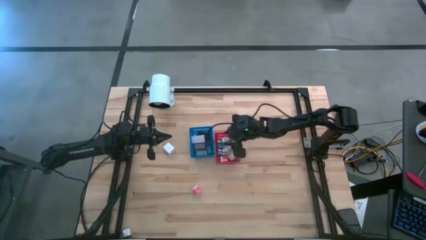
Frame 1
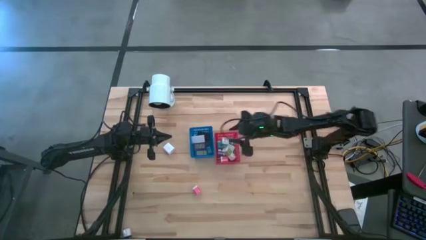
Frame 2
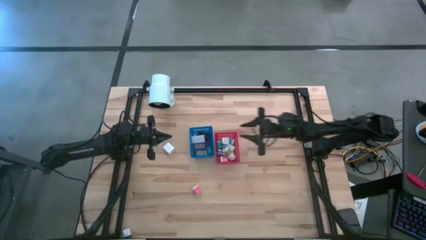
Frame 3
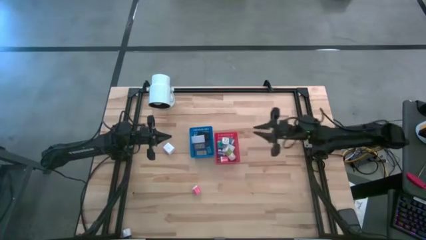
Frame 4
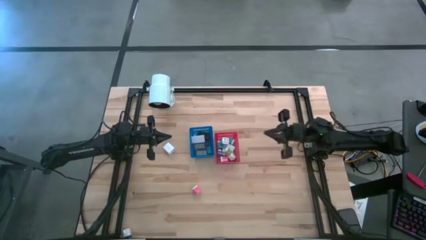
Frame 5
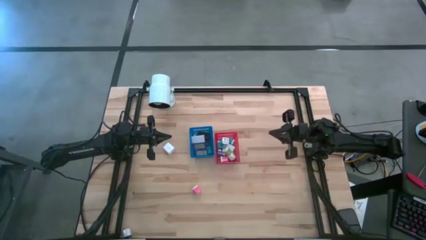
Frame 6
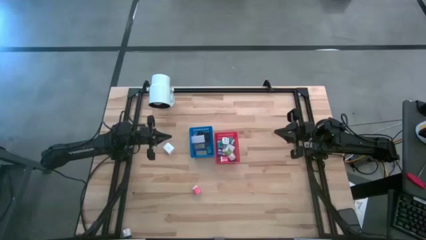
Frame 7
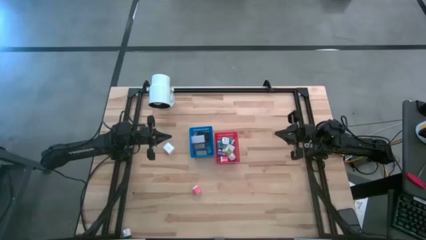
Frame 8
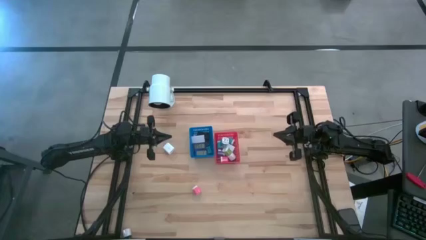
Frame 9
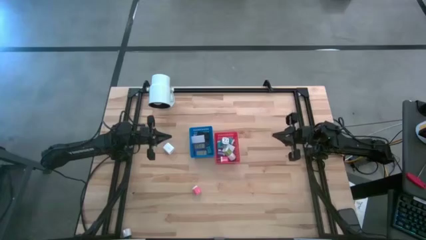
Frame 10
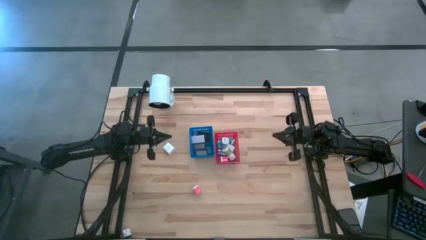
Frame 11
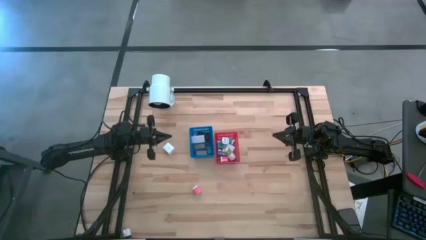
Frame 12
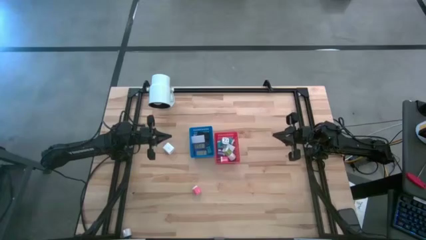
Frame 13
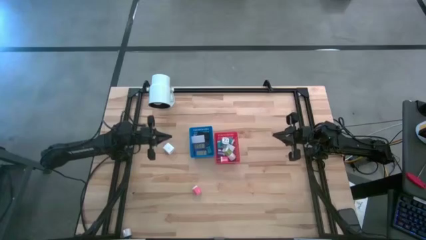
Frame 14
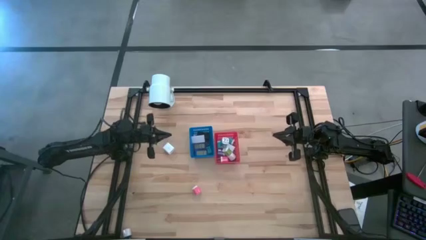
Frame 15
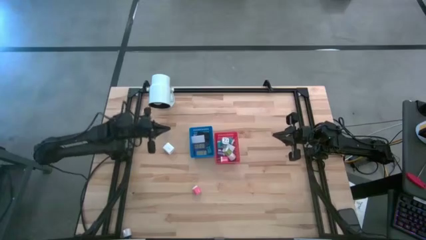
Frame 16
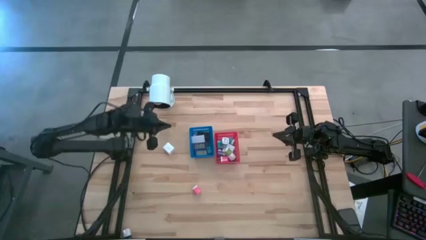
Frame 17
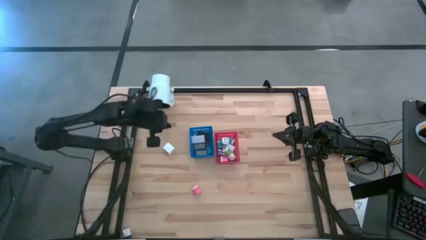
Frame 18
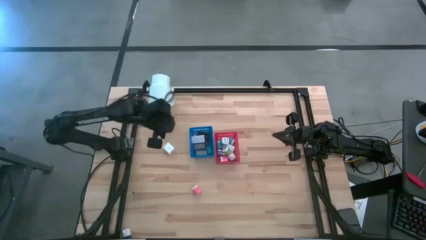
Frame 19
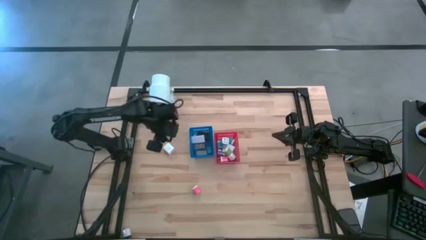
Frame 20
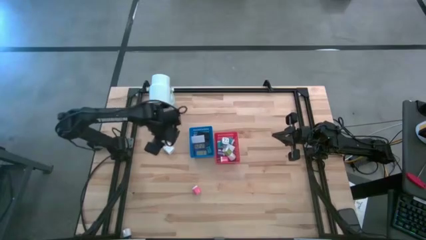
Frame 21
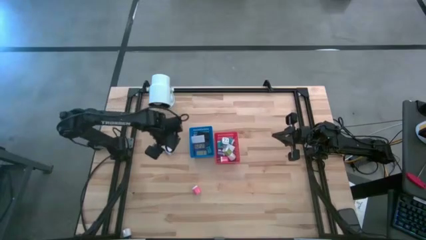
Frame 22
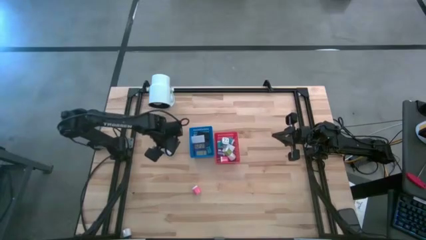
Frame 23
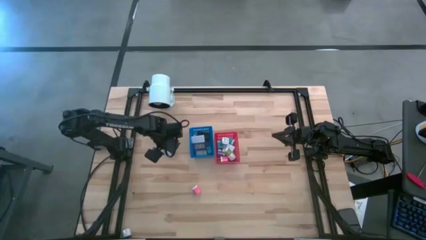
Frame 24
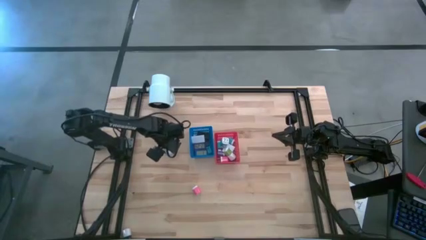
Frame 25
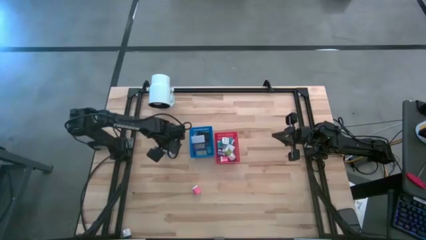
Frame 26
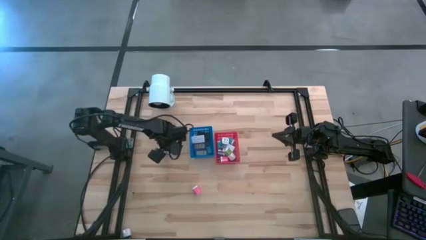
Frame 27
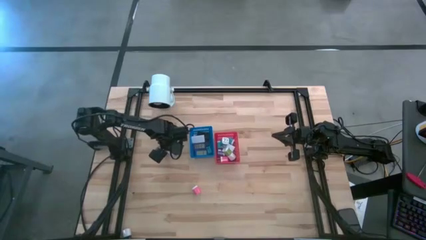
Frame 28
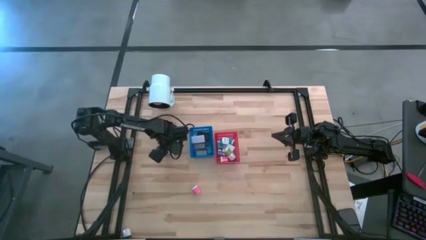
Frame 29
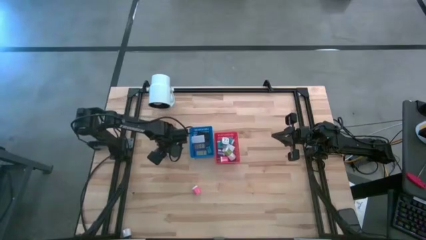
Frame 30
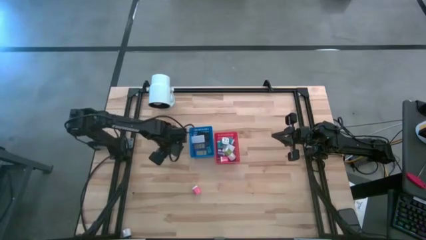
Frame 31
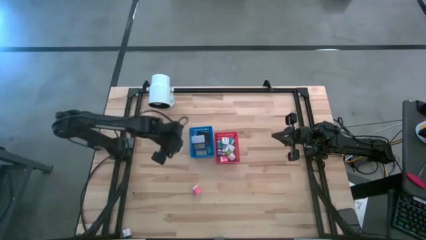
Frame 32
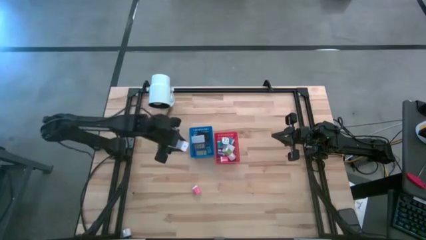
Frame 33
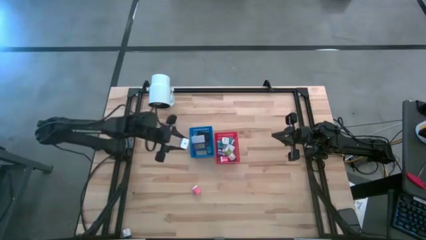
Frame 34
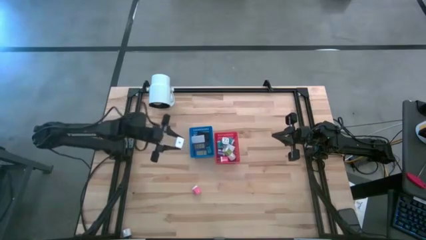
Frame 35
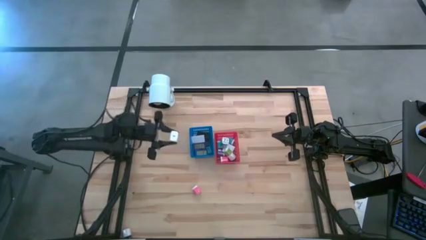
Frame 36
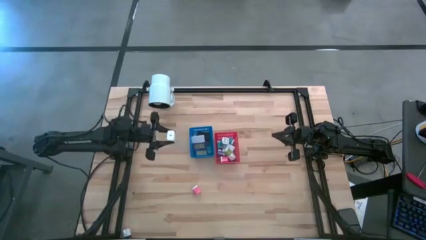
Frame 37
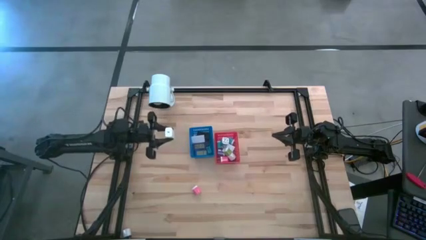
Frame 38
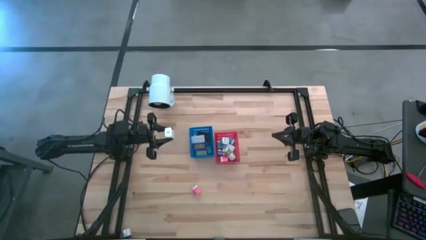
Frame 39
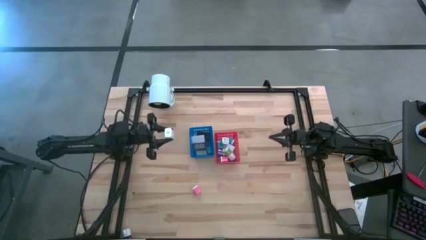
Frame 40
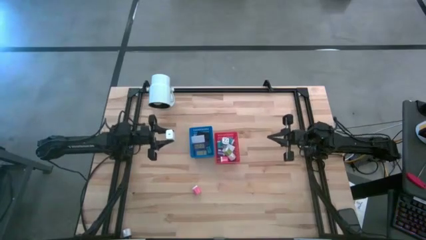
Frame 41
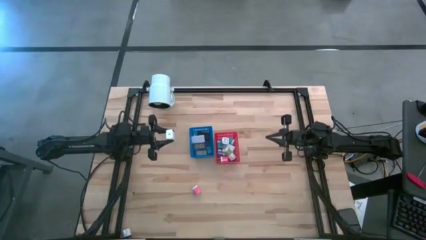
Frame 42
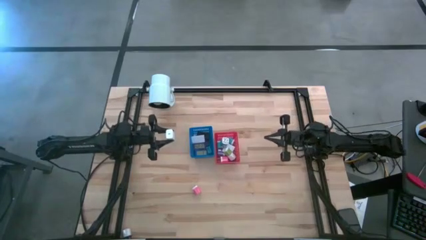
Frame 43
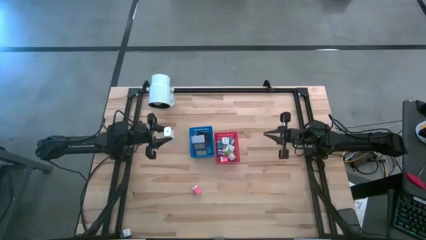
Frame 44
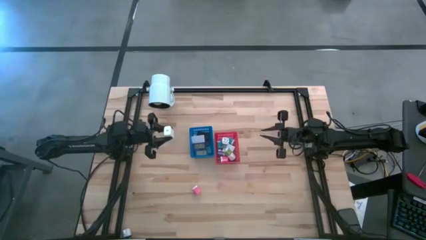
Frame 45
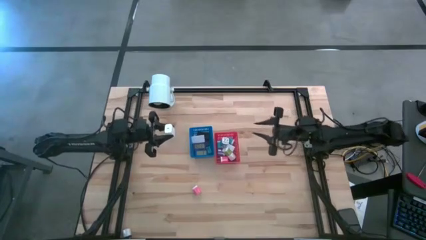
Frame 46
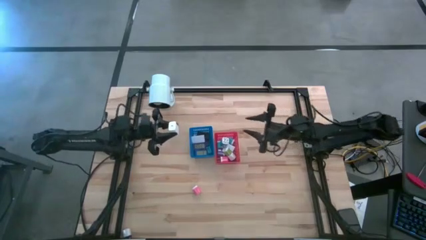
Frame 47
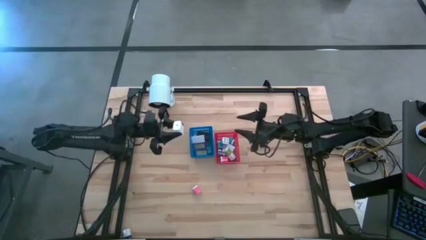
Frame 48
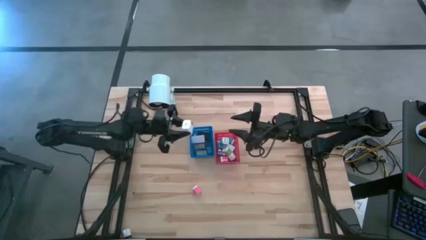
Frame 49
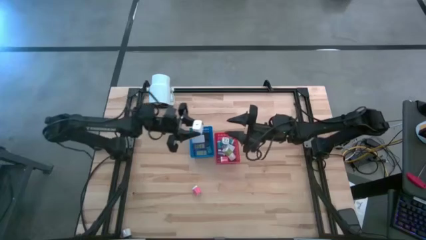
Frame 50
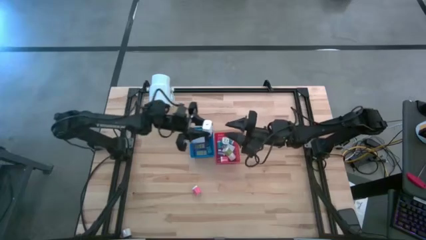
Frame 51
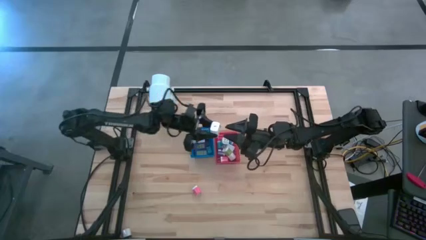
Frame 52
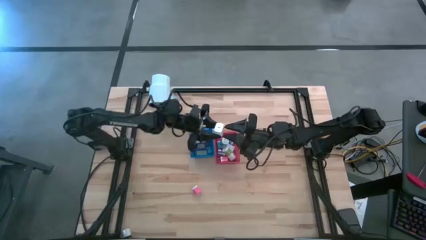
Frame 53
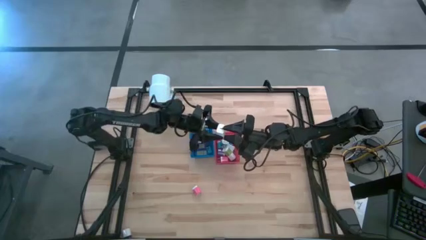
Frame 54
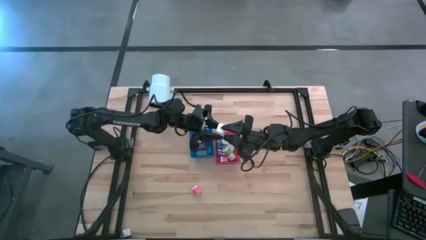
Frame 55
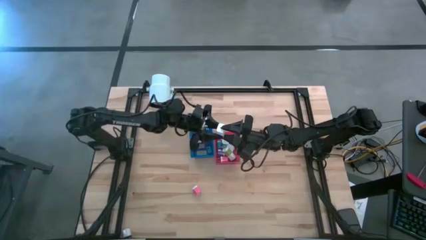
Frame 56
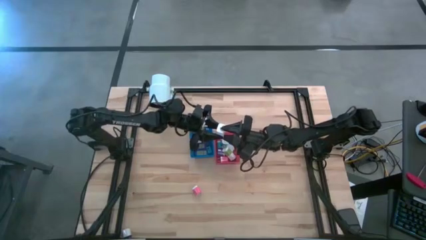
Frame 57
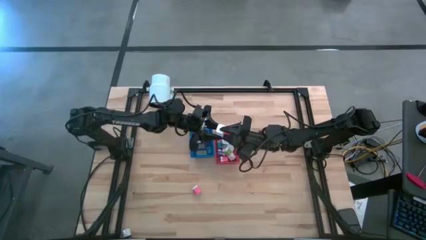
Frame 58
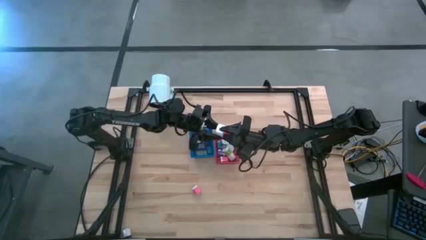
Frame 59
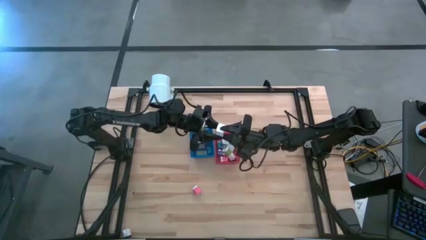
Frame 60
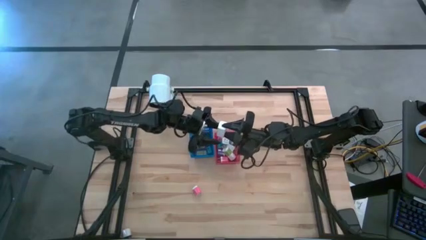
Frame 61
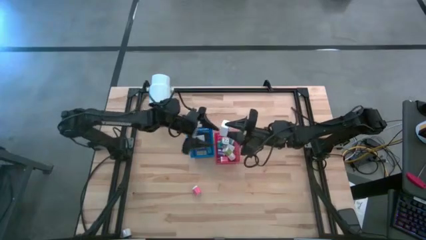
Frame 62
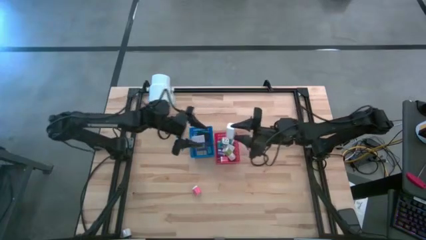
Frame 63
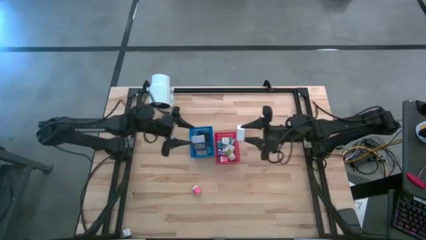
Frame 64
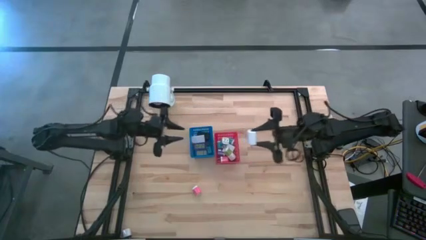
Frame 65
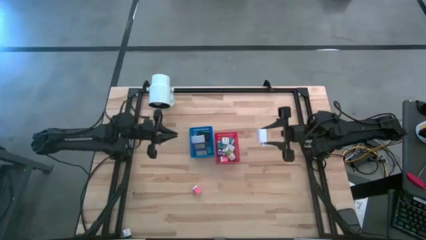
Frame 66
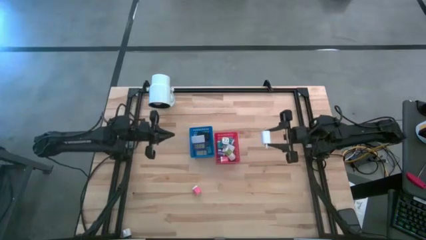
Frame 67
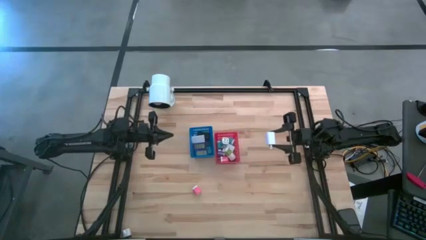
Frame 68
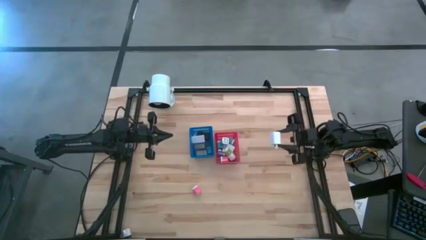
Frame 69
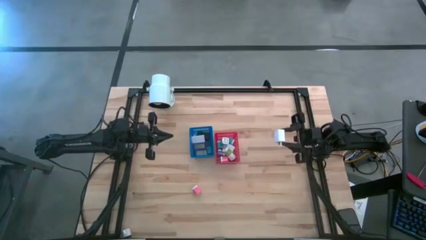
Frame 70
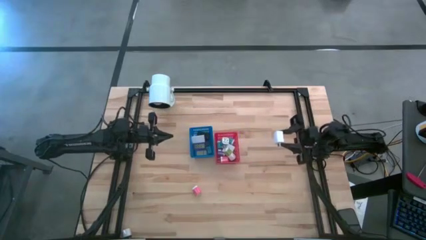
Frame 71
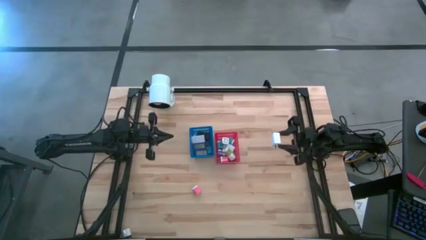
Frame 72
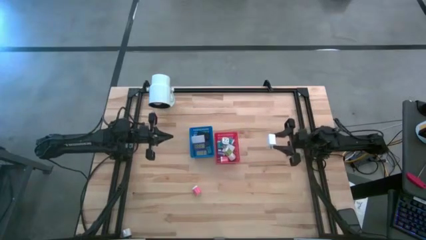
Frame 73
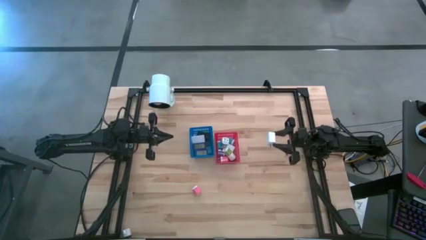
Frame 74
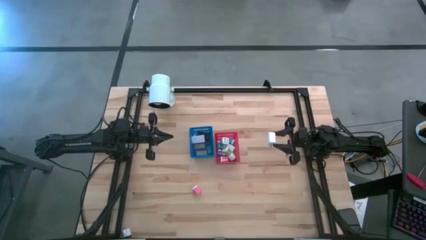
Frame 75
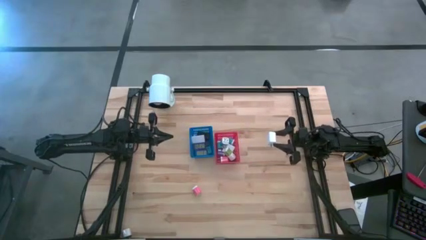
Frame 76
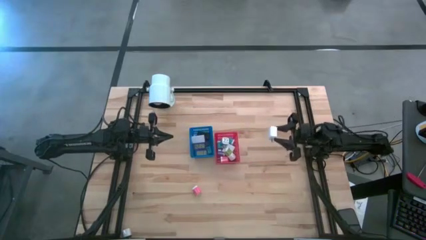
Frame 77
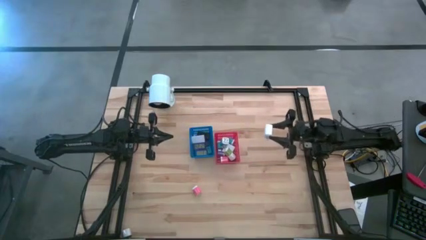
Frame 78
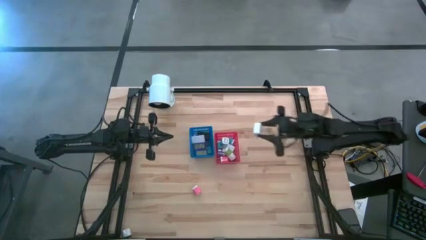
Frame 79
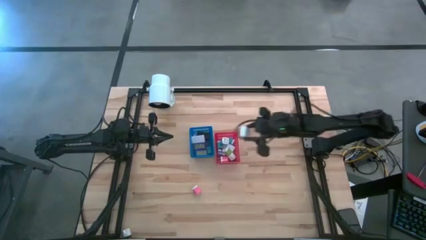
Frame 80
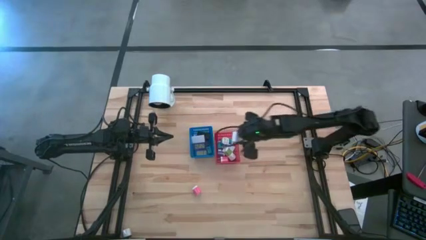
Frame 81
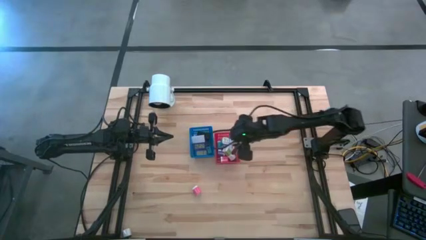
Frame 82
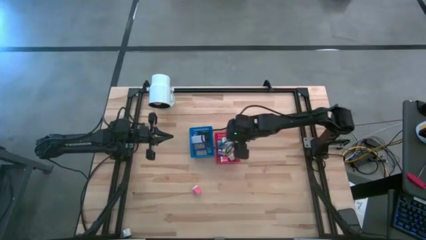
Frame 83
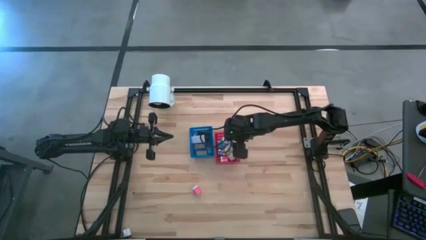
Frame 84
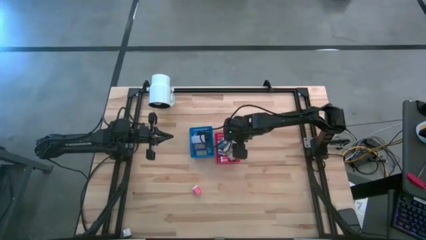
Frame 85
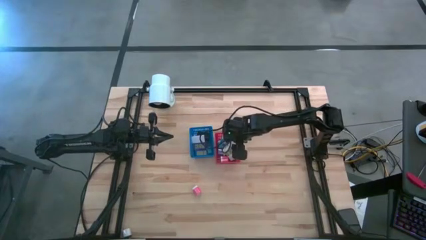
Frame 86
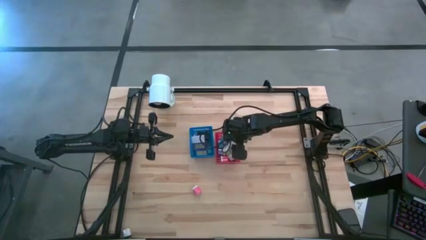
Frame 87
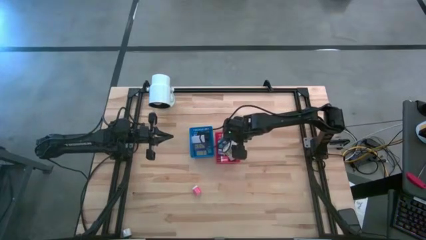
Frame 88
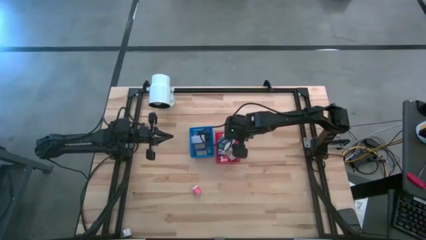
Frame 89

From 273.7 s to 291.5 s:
Task: Pick & Place Office items
Put the white charger adapter into the red bin
